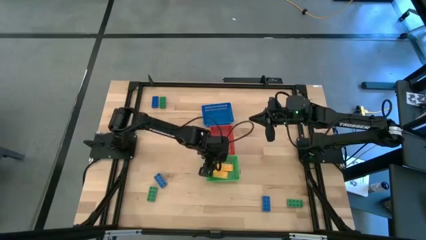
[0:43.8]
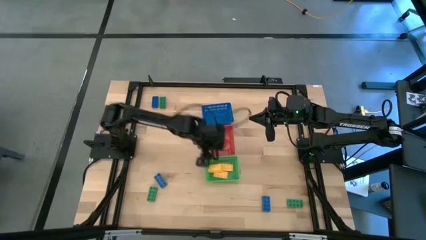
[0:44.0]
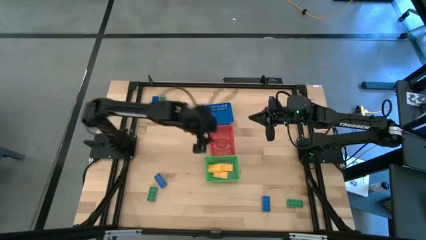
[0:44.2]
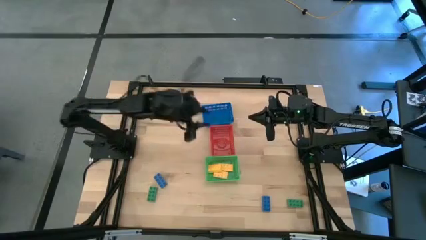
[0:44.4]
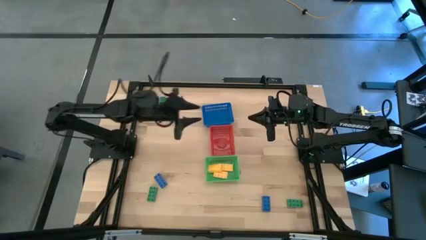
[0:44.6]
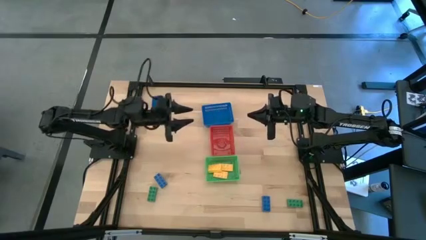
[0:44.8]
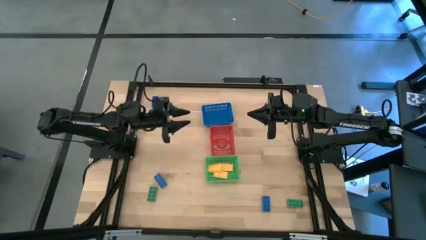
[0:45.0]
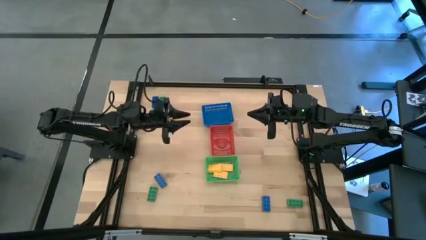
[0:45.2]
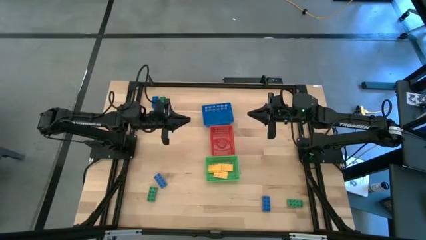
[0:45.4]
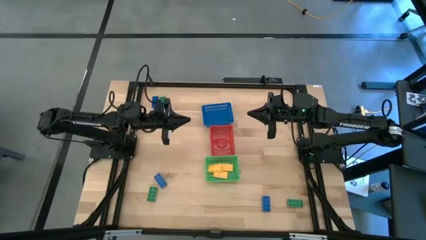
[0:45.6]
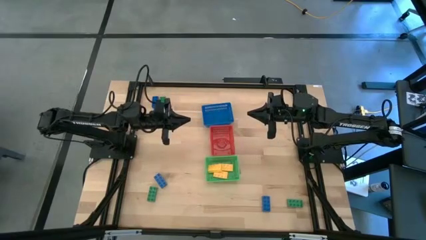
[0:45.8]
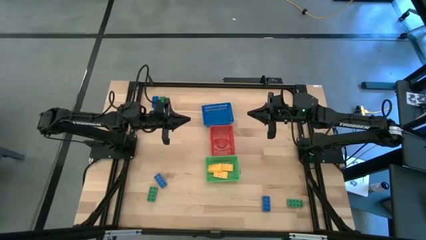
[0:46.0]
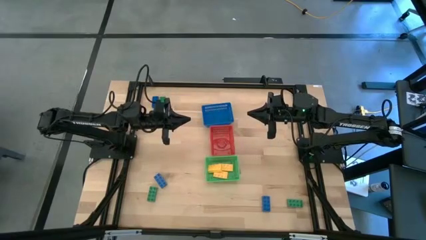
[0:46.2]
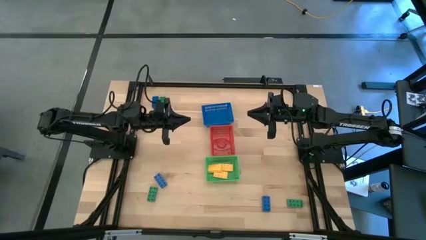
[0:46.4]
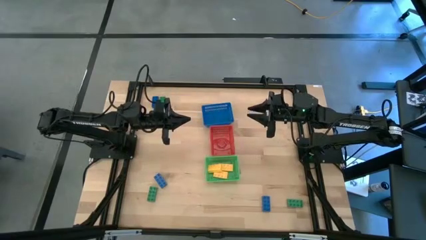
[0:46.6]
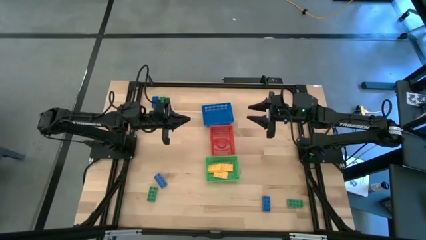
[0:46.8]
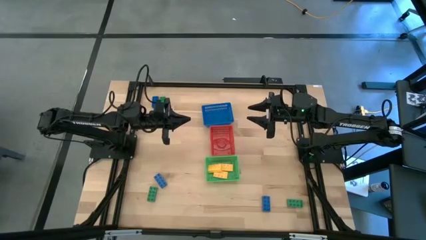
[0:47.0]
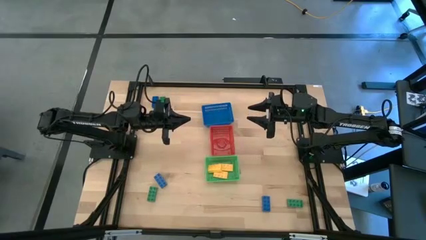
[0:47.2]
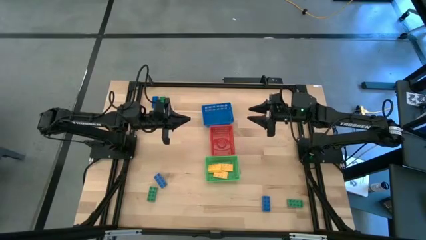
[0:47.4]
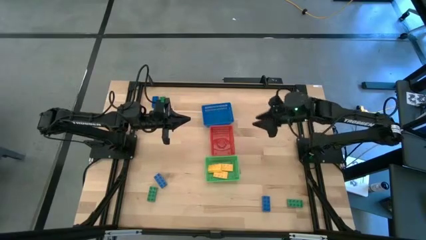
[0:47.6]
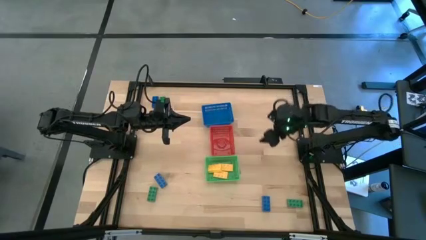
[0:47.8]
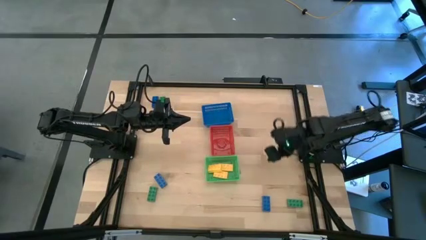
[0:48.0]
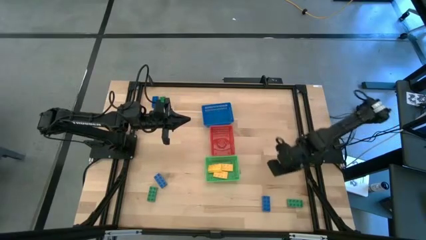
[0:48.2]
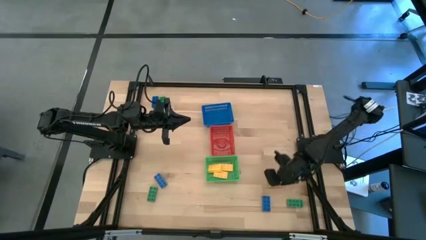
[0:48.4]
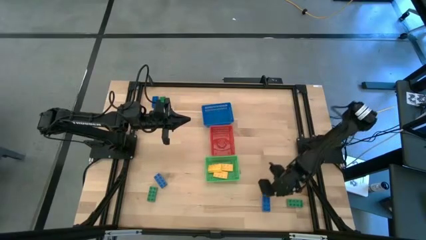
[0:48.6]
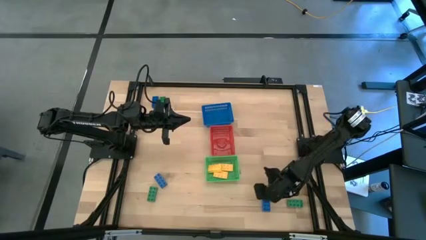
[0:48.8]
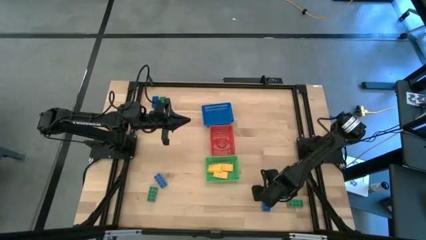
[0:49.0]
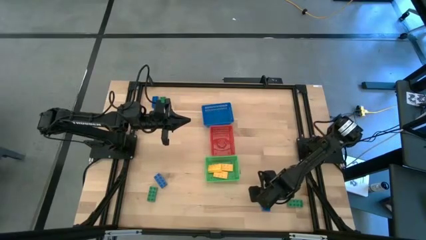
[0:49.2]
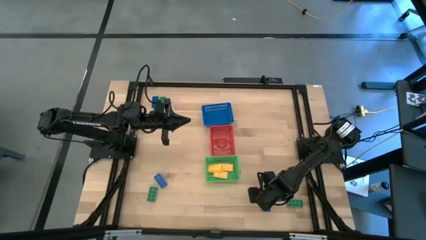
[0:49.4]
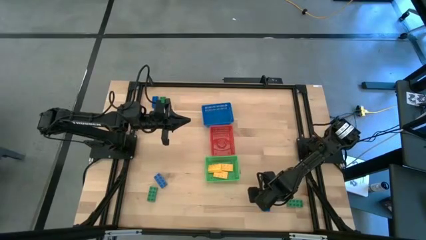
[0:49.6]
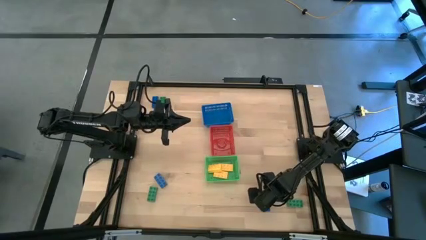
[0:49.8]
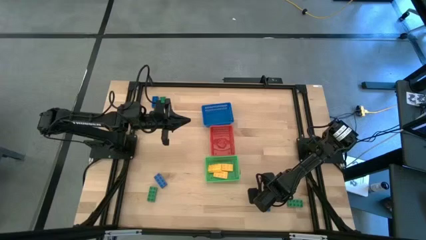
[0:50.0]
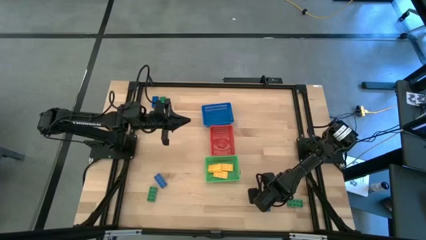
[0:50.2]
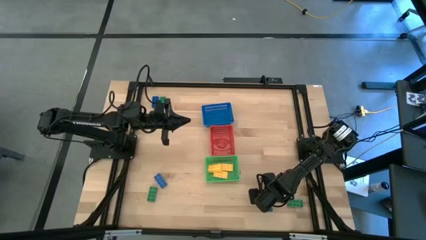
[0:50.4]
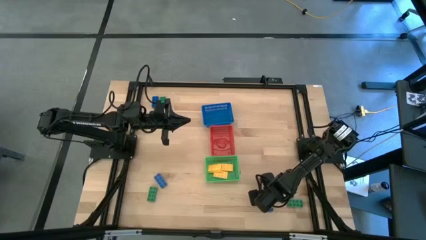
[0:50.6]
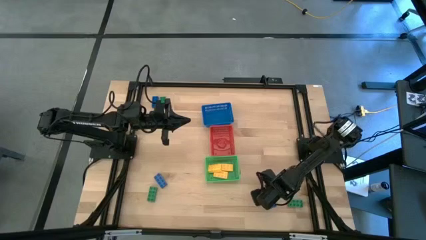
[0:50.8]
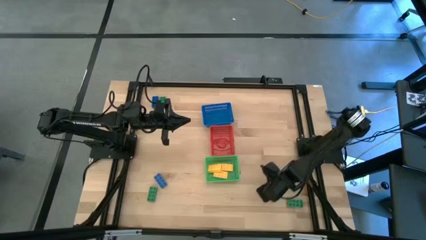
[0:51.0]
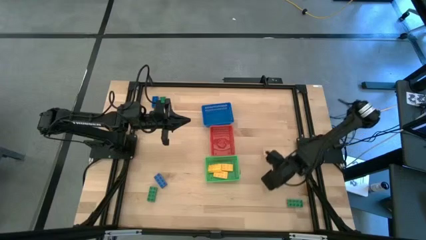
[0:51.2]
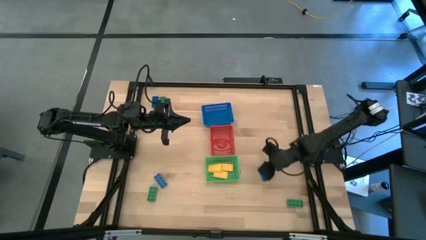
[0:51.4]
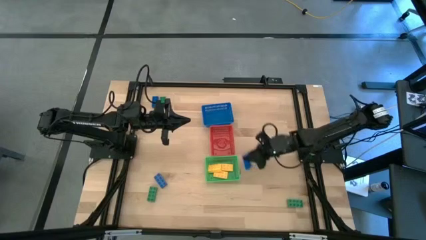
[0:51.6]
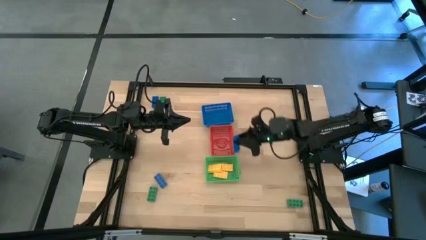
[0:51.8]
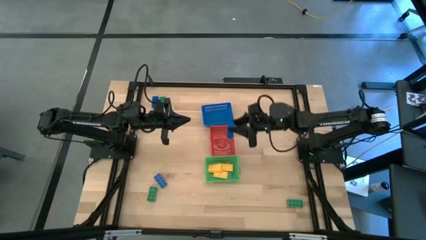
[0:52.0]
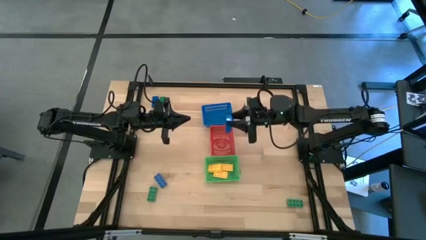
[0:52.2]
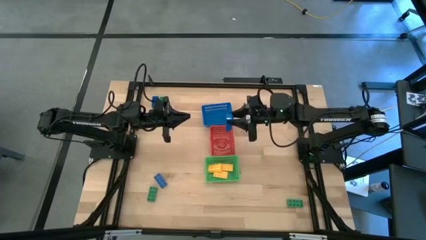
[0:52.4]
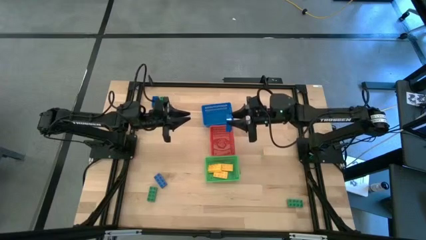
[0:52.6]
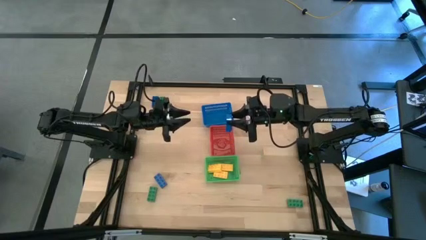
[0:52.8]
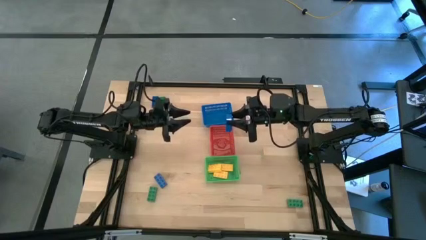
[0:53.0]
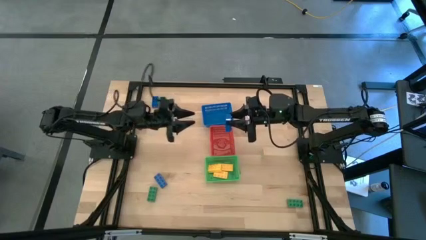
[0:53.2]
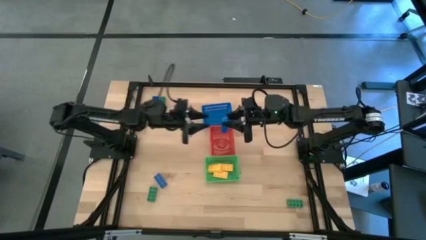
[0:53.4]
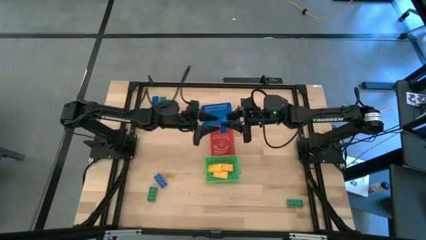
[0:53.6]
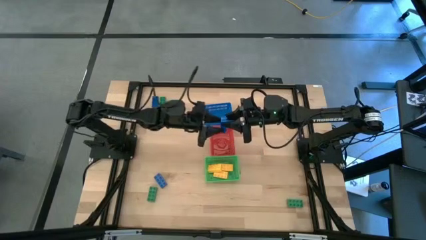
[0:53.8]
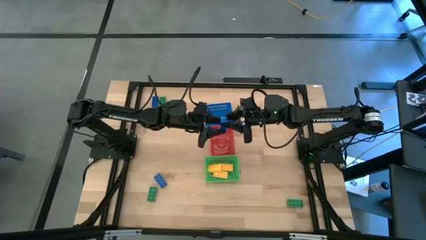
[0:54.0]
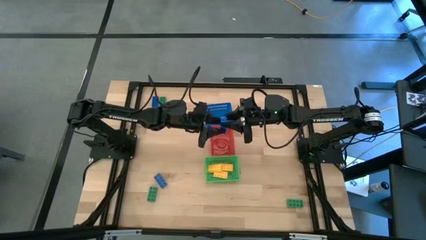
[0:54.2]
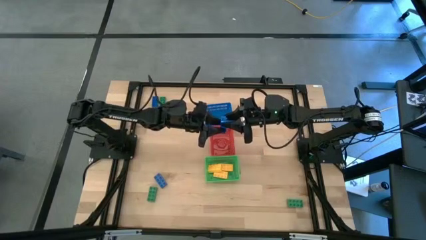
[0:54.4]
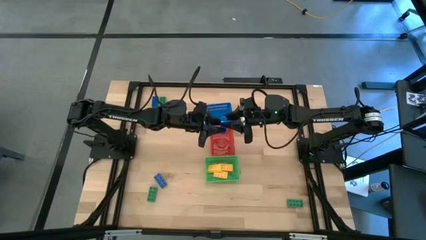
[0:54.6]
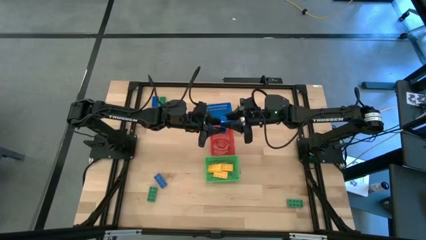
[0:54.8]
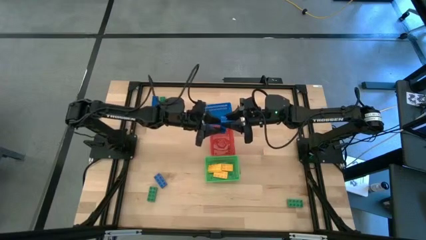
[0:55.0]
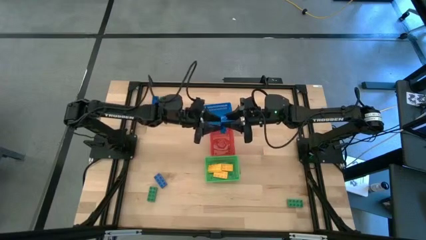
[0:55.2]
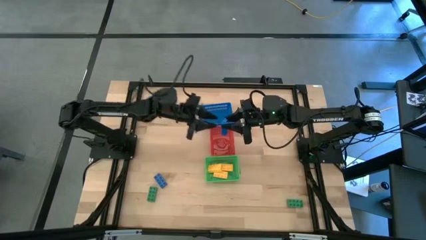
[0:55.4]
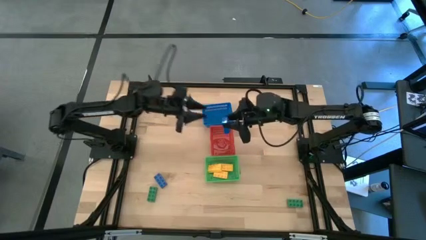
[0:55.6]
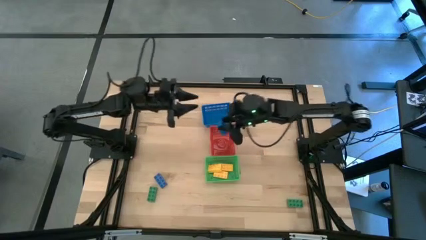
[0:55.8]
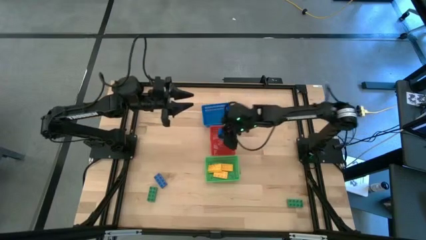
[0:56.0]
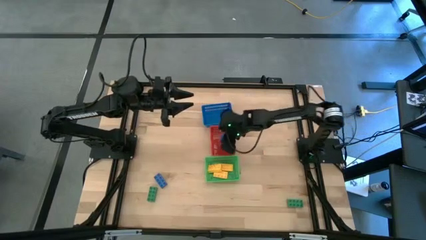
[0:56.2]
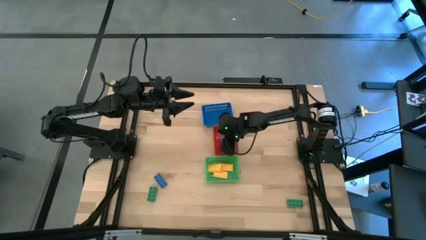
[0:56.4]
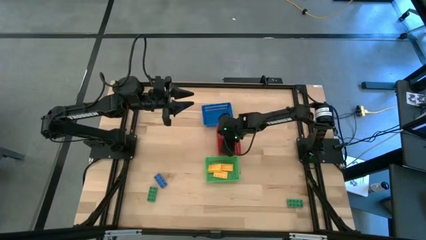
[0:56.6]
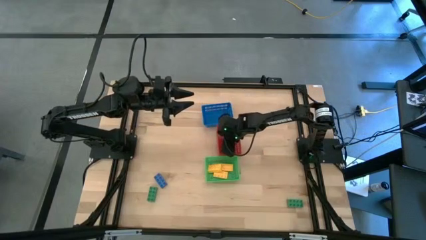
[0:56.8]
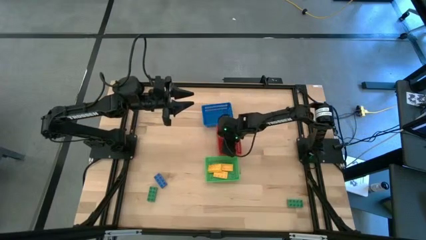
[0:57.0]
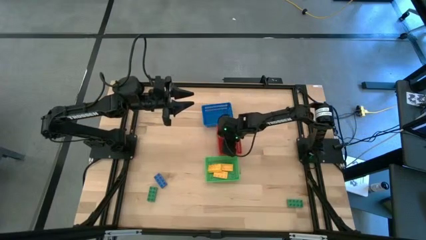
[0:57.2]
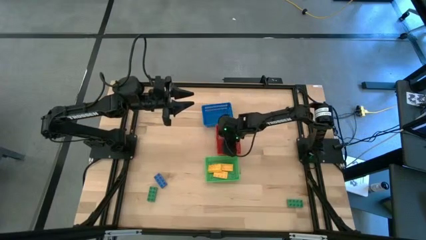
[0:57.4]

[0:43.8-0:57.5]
Task: Sort & place blocks by color
Put the right blue game piece into the red basket
